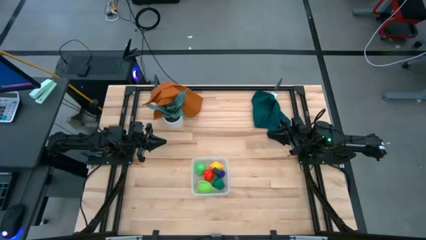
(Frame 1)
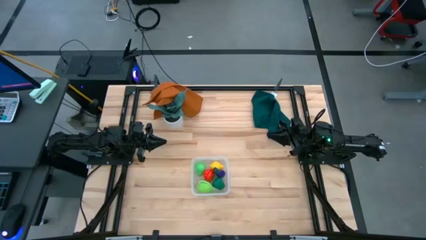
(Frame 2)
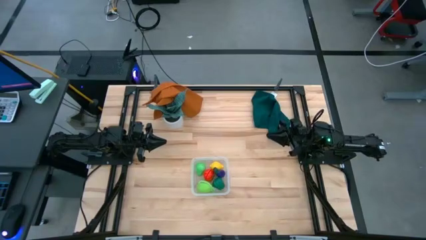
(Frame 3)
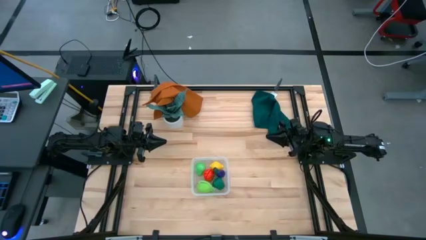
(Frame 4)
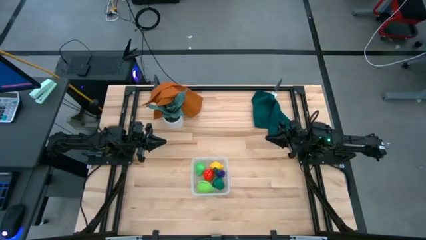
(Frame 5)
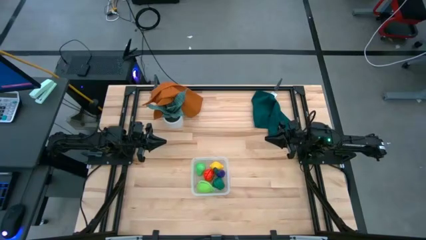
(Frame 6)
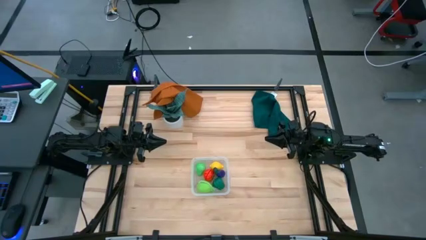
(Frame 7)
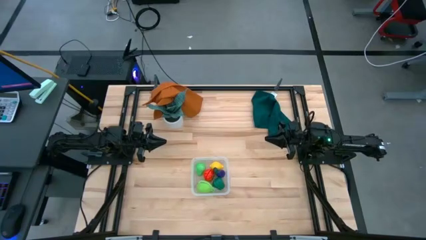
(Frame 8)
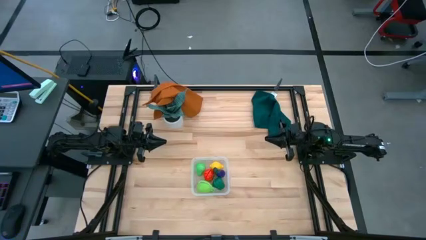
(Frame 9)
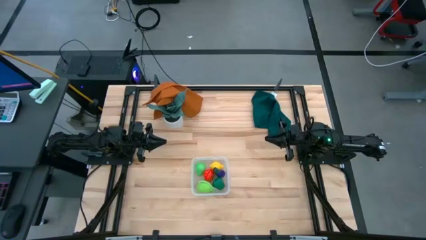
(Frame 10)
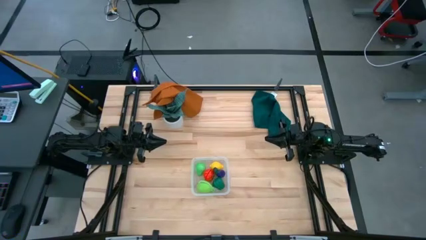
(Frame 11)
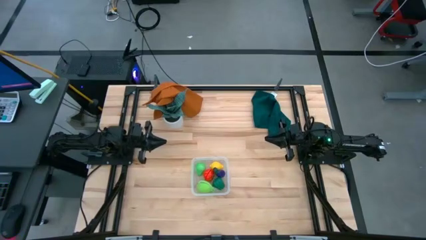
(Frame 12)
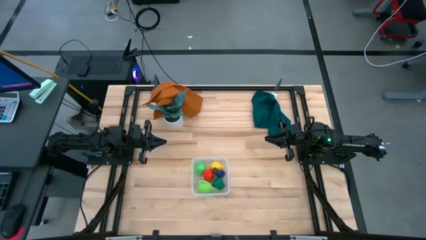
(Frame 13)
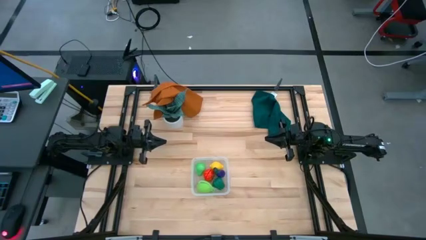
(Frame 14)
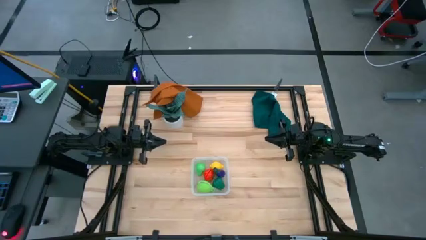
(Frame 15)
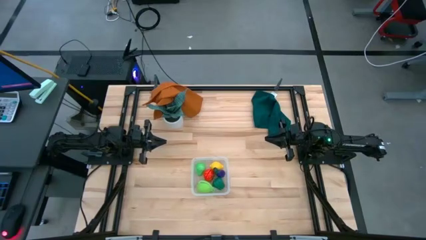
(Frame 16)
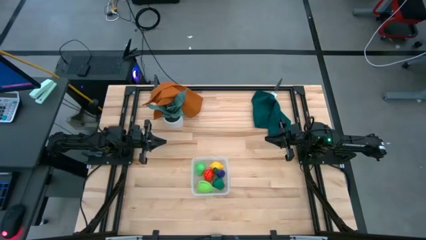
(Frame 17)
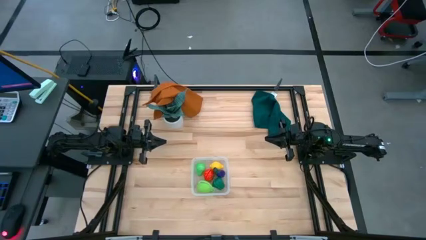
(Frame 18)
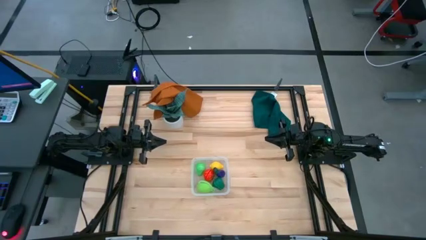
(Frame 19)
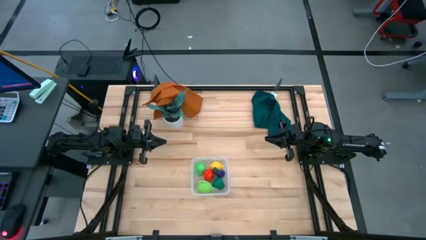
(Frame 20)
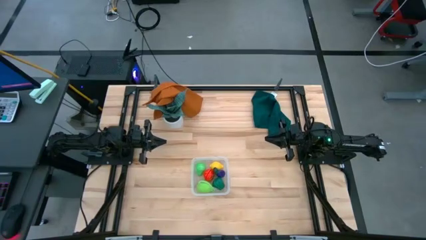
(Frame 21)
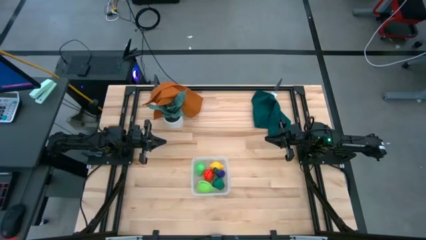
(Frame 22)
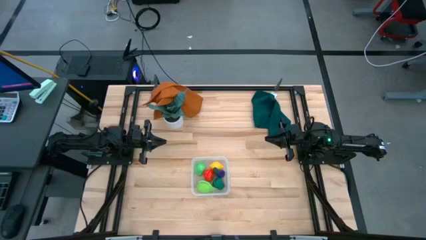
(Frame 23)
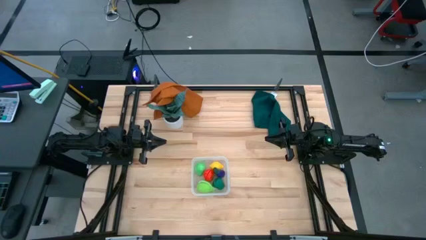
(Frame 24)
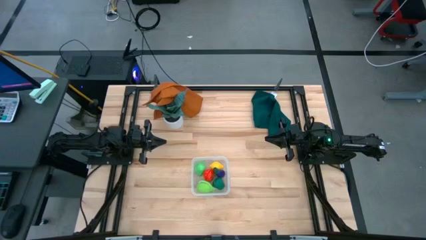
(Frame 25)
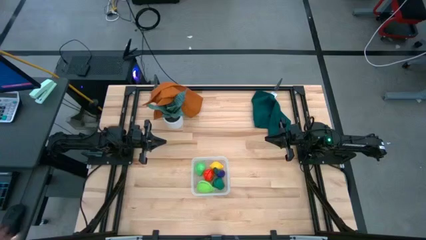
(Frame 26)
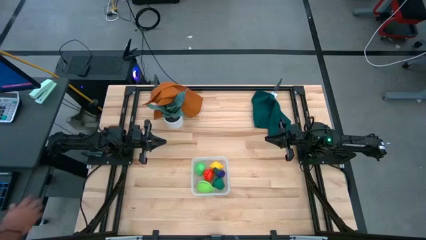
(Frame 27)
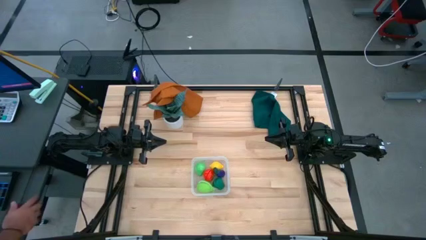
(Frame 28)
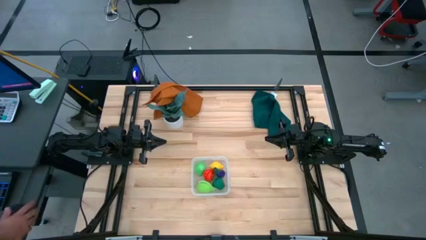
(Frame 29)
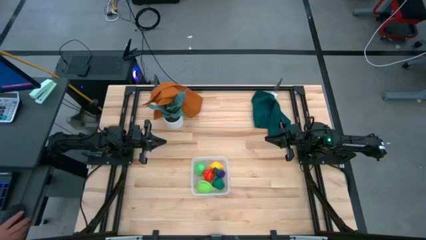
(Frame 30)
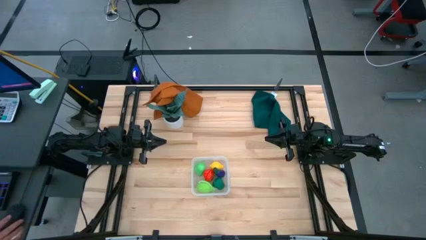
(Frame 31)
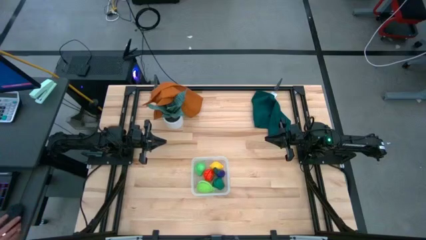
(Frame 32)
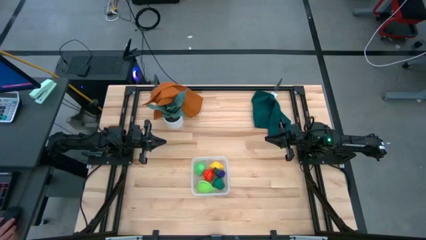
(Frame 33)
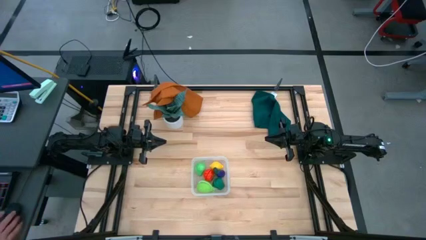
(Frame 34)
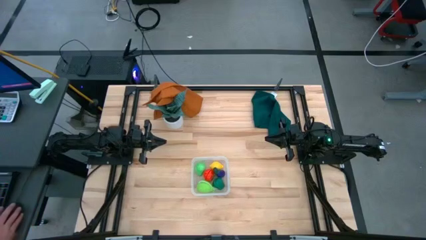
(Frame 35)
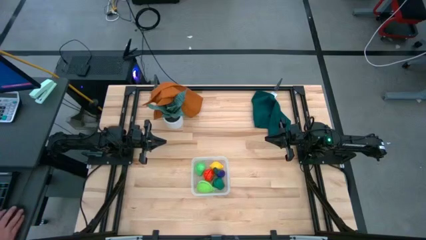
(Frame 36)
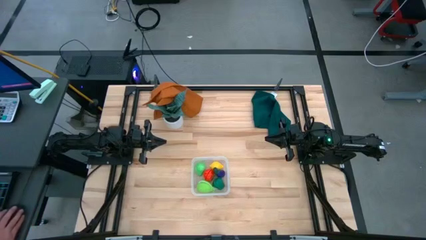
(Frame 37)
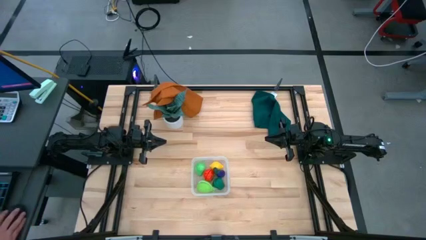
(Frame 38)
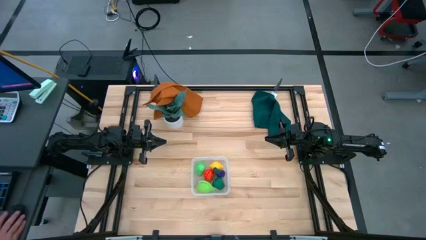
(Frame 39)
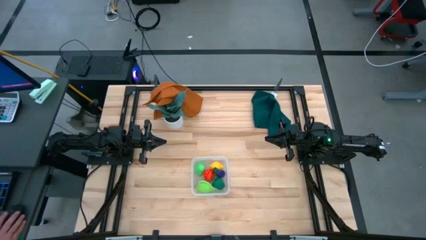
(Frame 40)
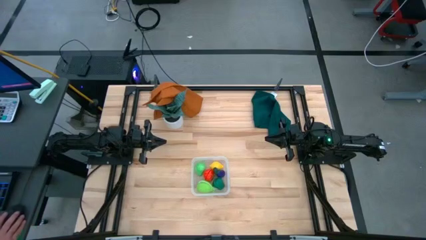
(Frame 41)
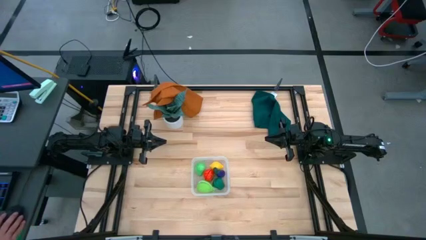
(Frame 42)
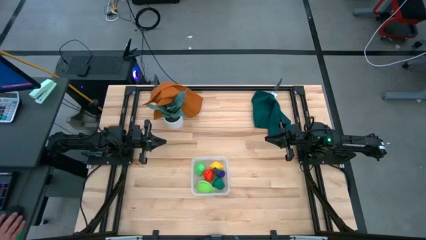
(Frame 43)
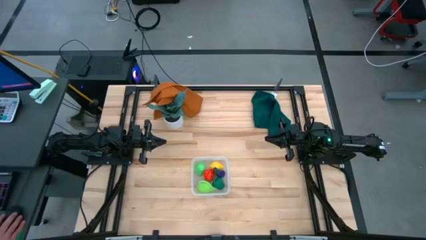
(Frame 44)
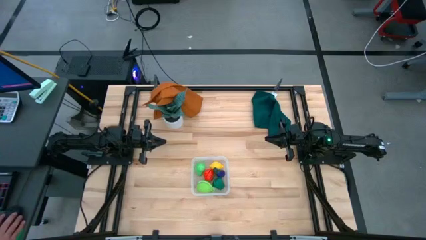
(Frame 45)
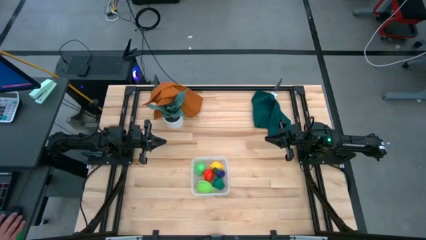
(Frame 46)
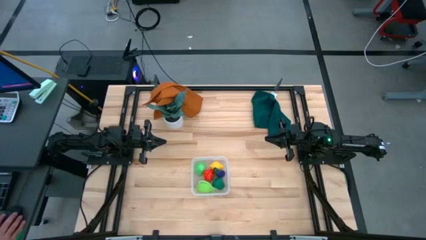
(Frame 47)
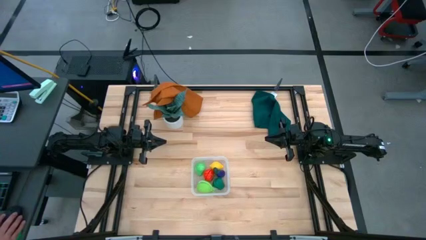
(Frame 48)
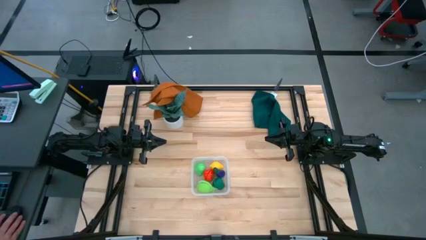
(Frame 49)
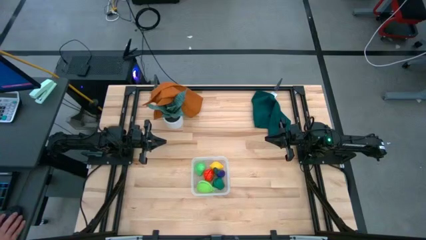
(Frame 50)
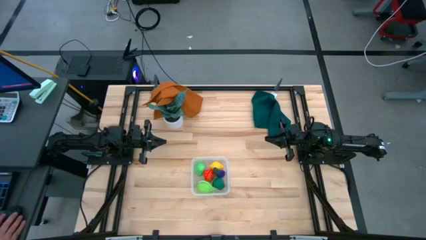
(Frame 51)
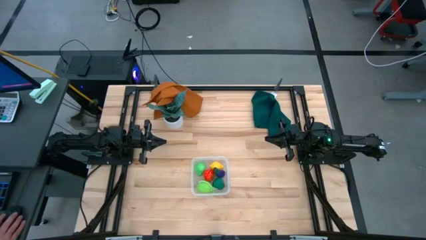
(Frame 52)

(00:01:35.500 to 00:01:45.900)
Task: Pick and placing Produce into tupperware
Return to Home Position
